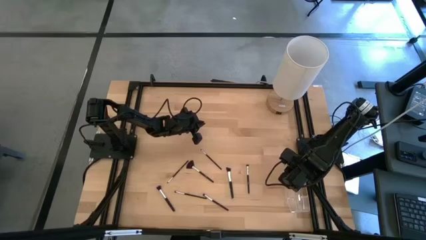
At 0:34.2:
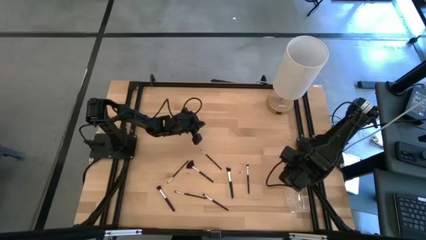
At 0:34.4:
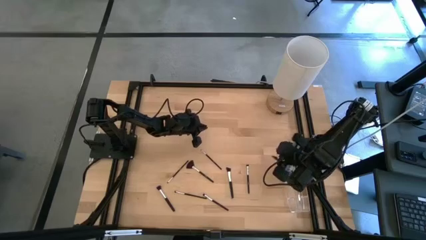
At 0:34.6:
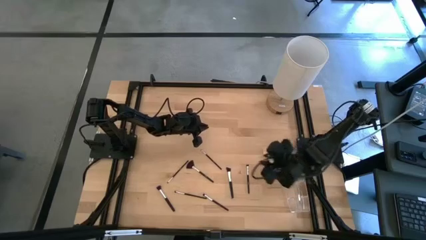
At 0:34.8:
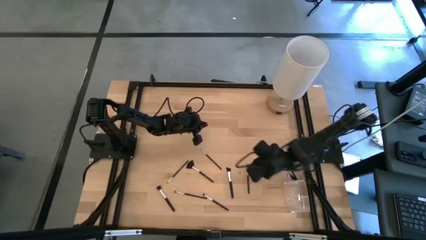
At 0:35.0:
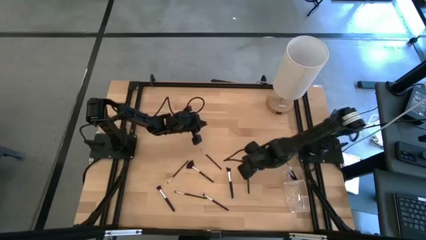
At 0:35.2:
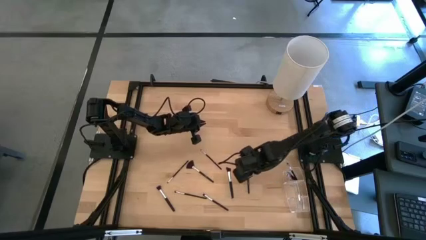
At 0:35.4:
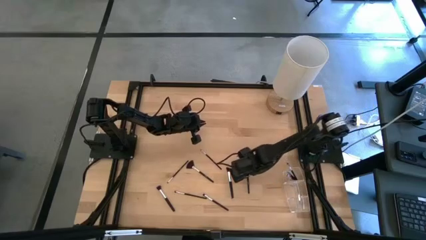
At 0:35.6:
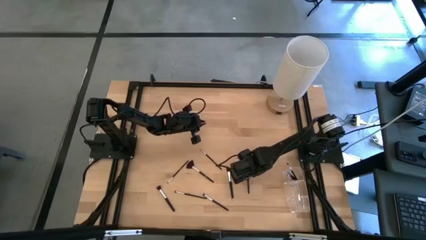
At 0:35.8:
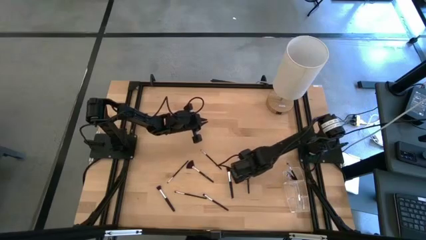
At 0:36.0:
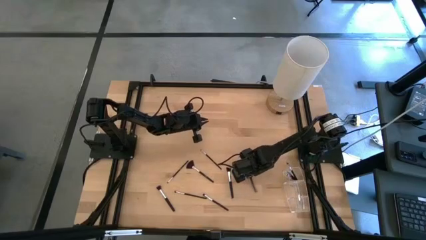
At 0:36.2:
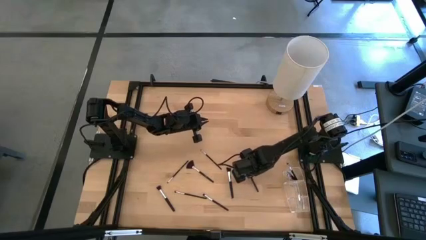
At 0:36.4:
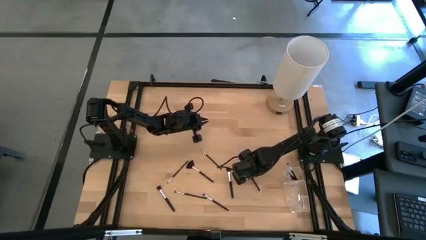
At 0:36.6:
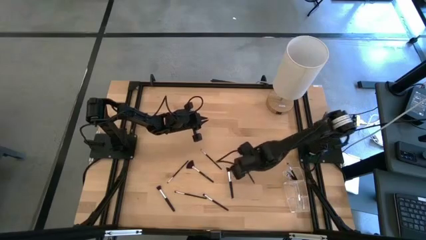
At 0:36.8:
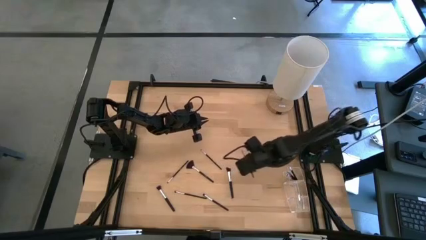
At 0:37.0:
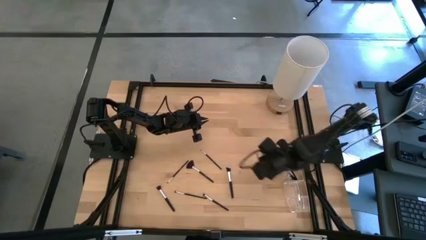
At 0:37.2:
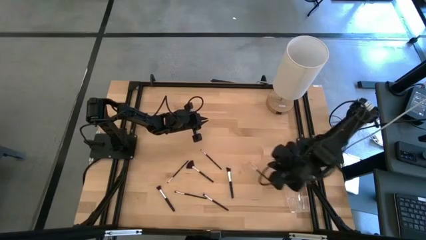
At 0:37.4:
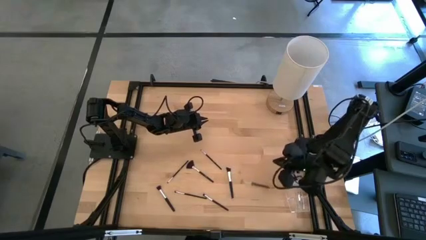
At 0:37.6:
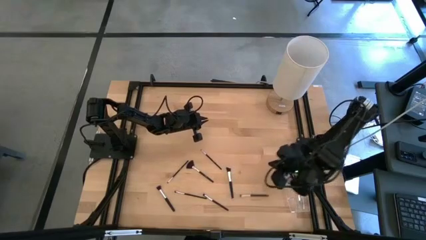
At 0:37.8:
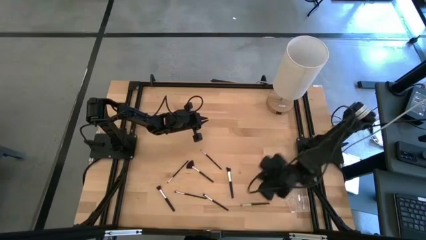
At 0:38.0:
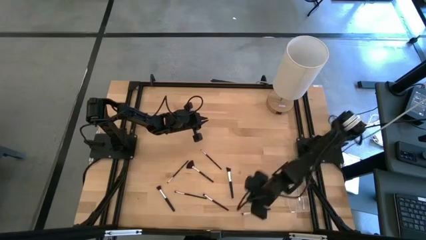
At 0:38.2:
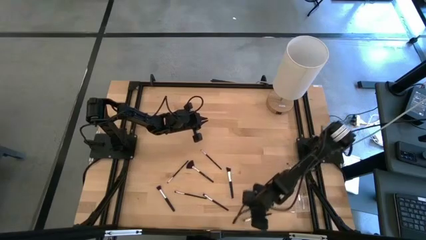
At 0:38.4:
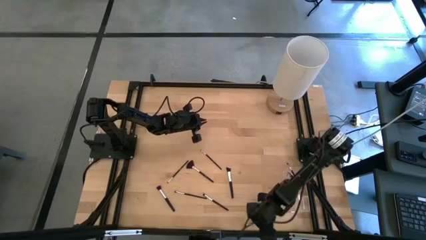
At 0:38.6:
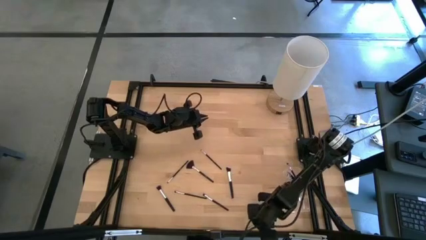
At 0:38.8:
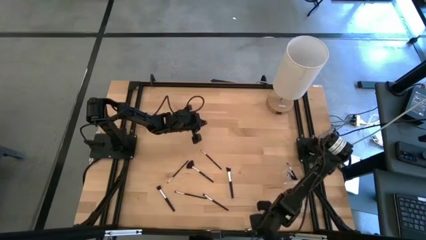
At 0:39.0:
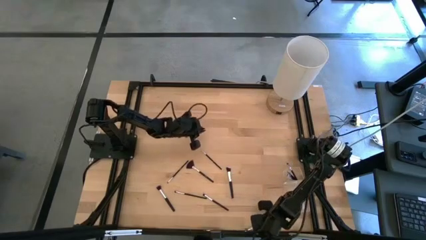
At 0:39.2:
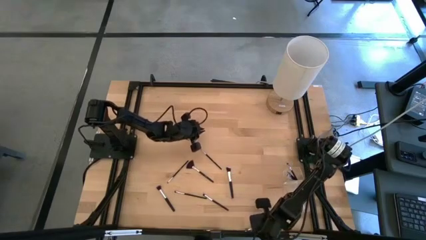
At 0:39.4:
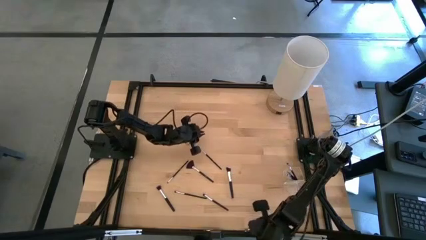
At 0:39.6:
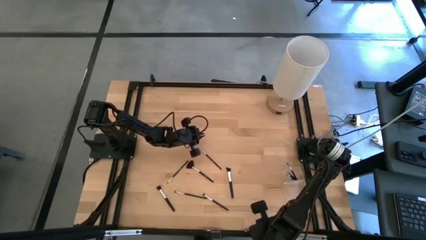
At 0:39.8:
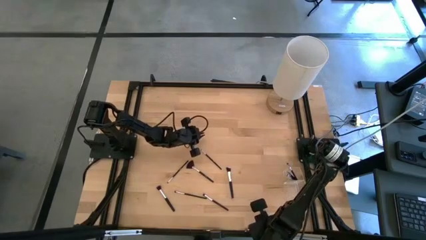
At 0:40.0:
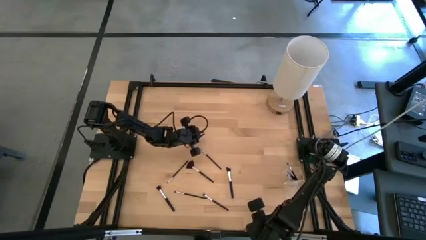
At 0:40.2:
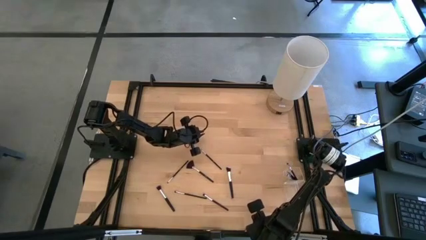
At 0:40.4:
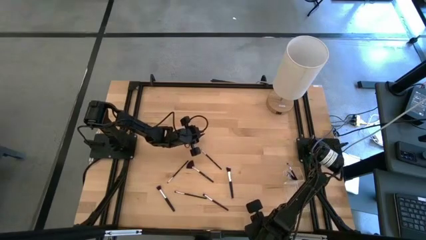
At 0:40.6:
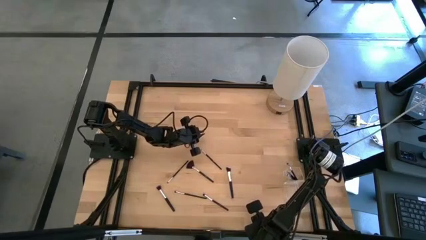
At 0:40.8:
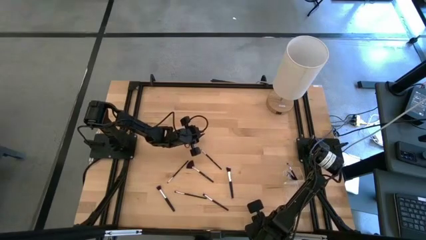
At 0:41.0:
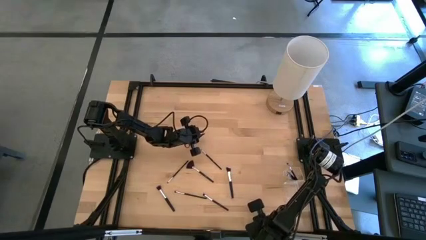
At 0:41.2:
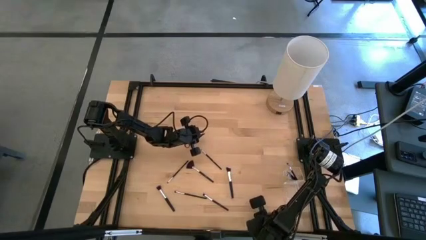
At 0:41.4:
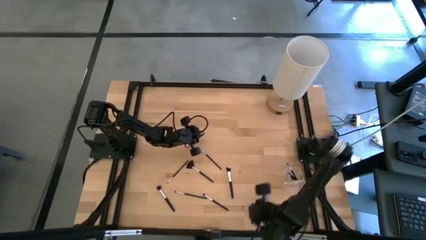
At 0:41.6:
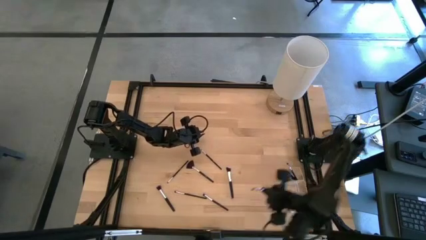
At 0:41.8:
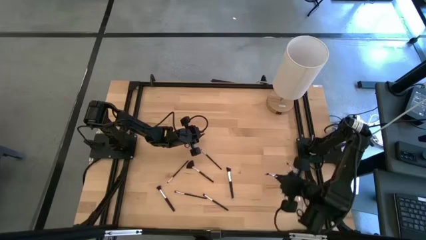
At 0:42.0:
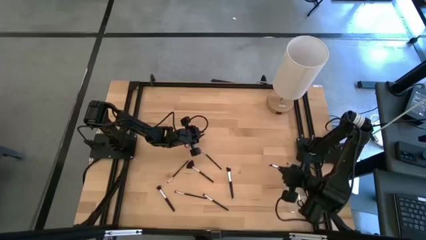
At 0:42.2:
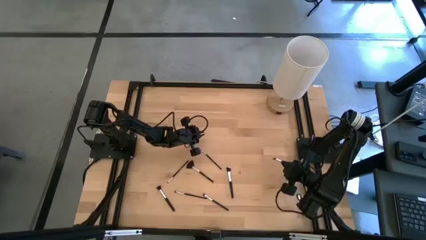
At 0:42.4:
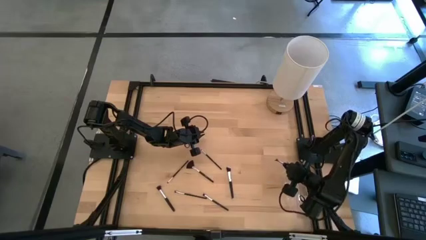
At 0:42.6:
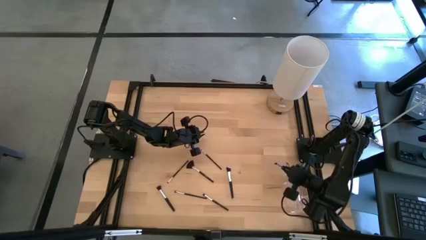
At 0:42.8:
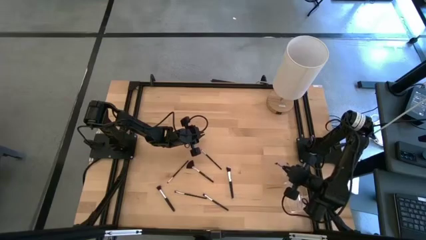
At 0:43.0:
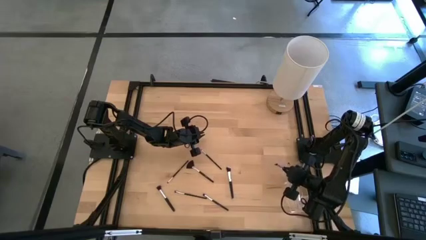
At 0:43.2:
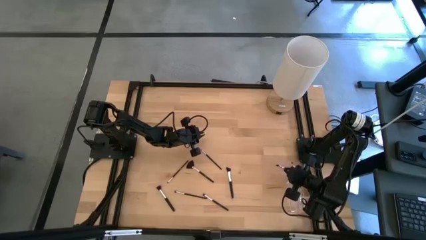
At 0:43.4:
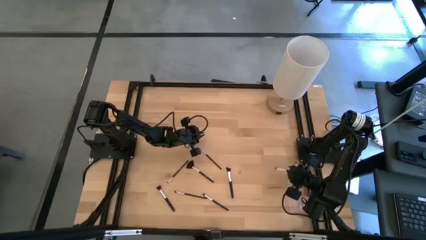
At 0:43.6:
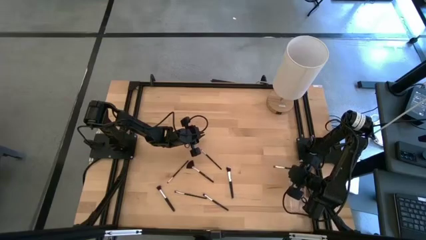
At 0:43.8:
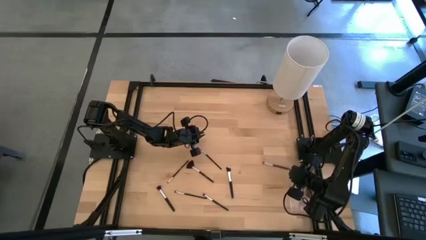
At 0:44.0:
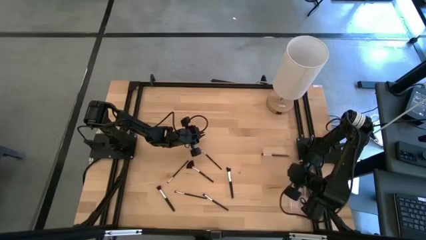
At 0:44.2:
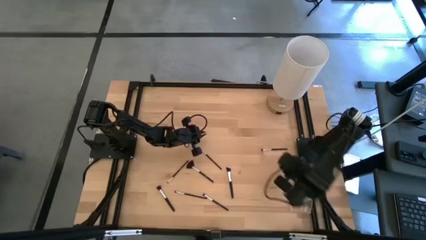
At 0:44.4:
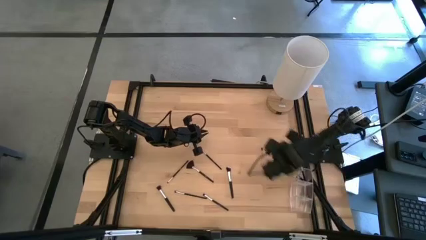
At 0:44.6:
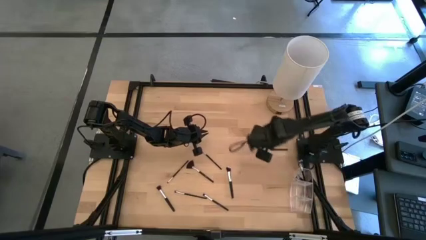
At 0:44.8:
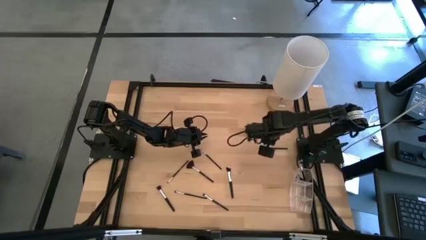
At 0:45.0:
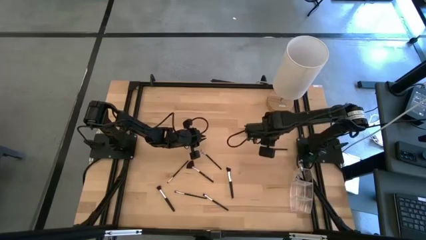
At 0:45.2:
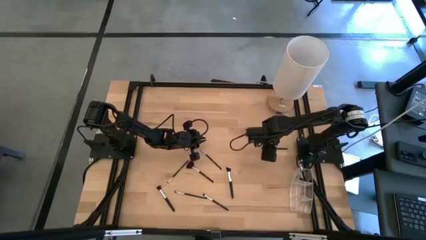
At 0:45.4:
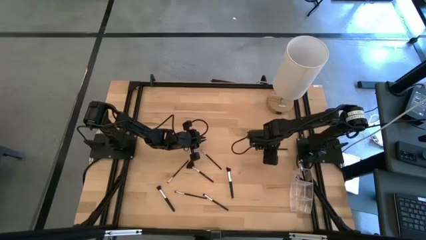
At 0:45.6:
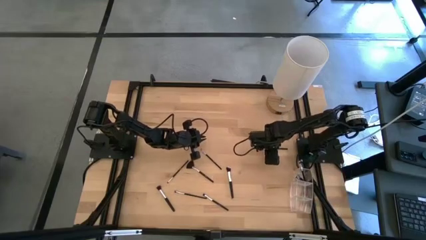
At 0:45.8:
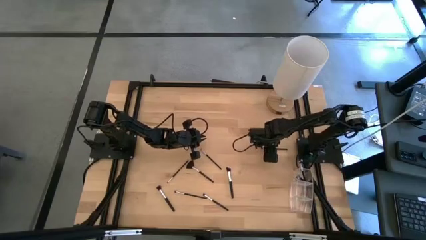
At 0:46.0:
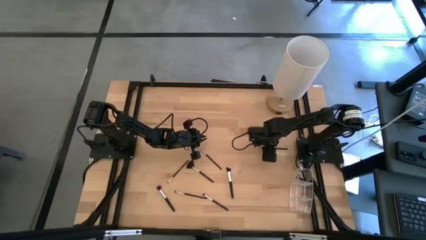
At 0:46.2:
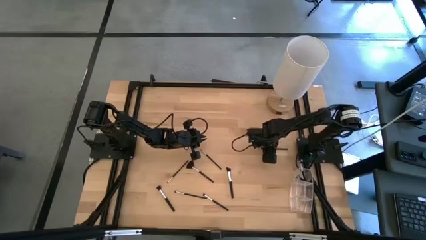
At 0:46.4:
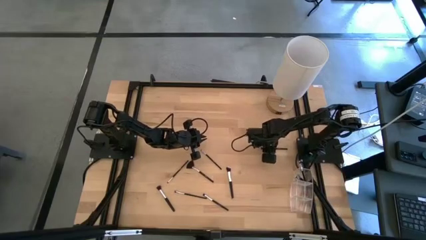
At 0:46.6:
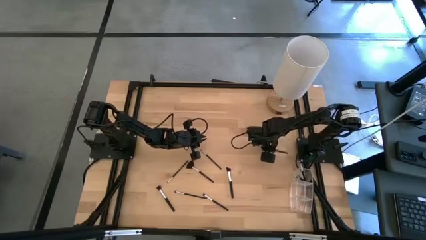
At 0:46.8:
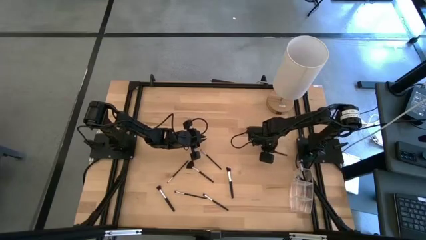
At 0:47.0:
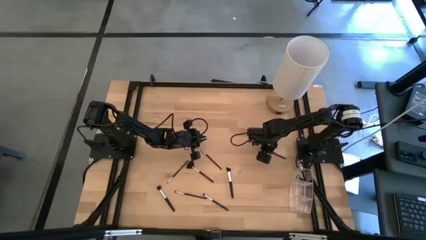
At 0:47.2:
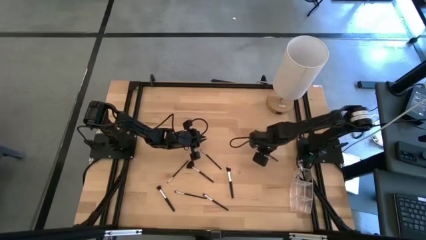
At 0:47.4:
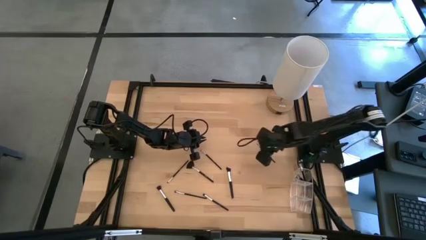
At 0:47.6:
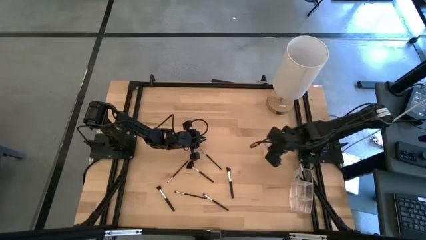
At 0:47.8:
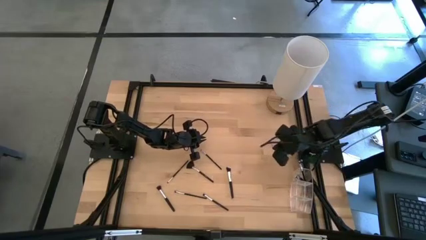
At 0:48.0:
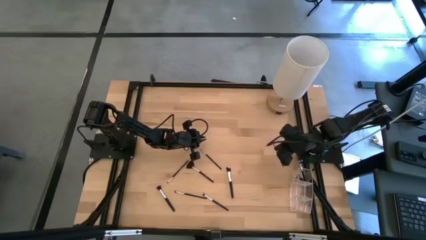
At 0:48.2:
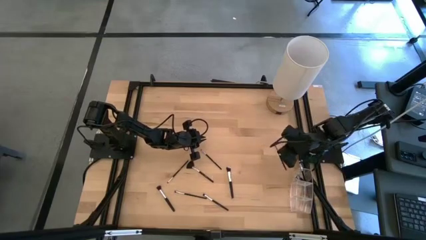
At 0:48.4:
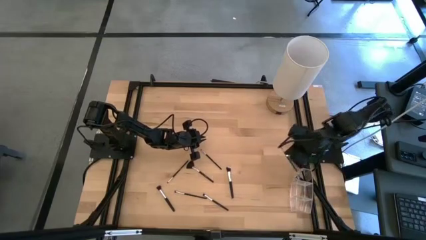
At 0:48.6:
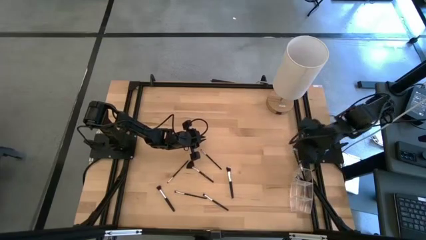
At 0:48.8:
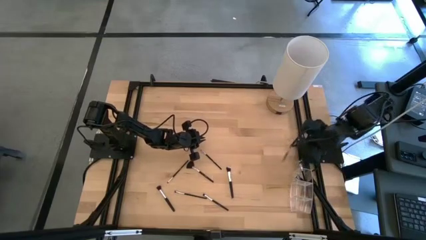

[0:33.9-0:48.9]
Task: Put items in baskets/containers
Put the foundation brush into the left section of the transparent organizer
